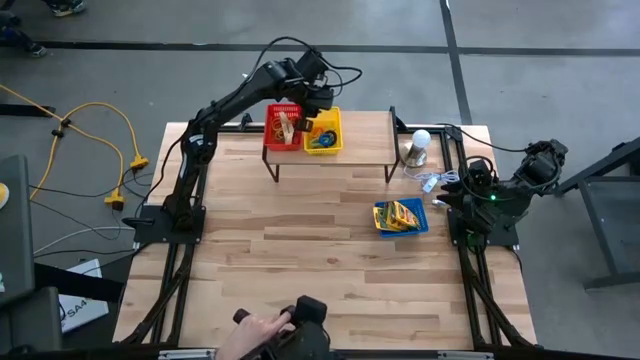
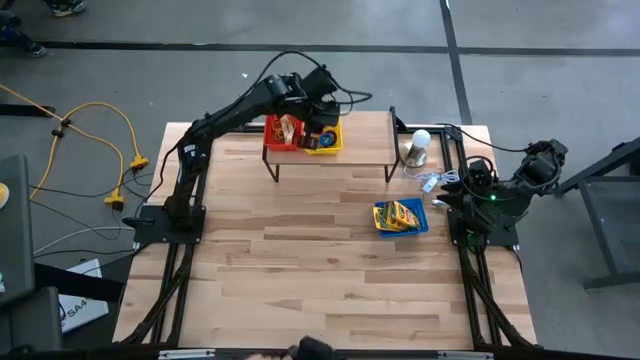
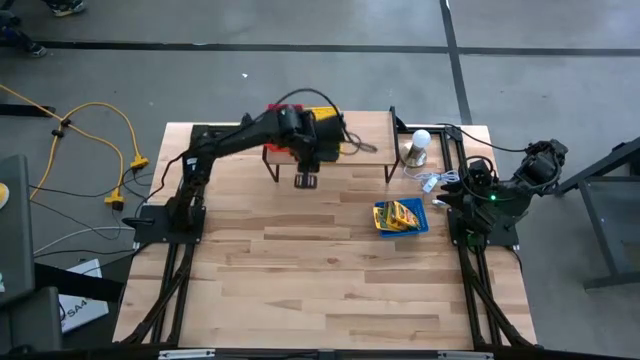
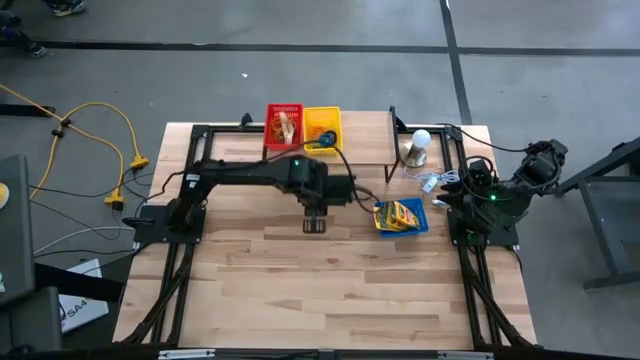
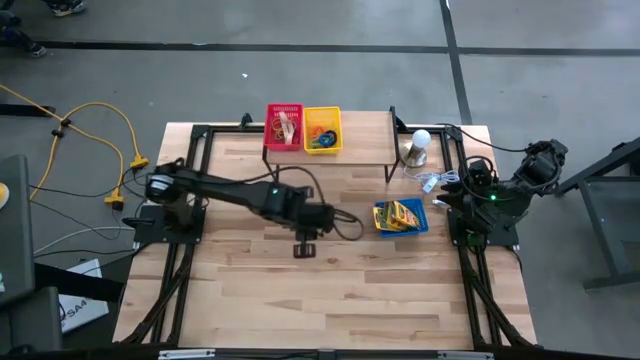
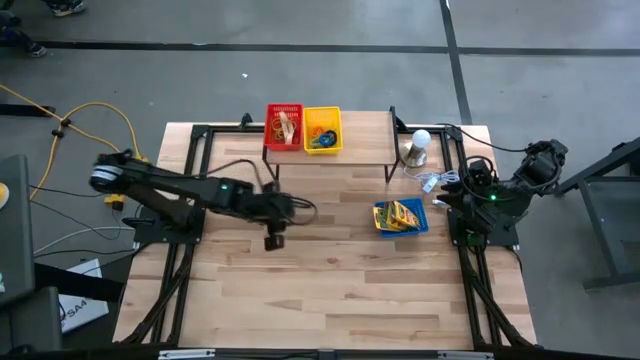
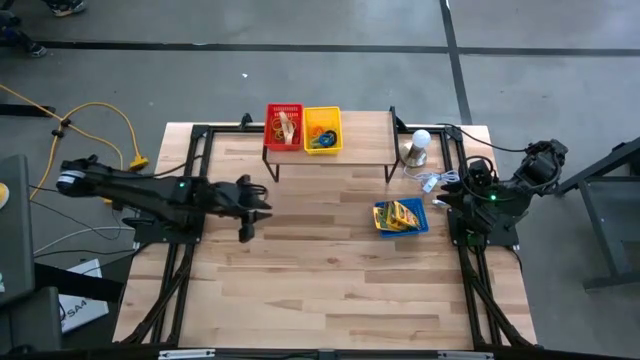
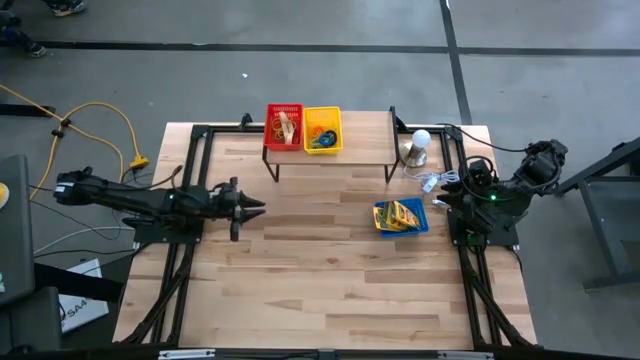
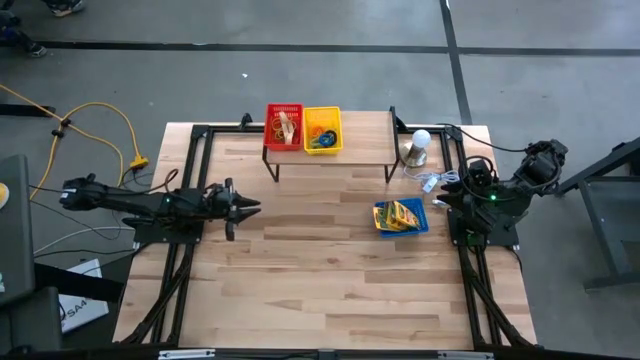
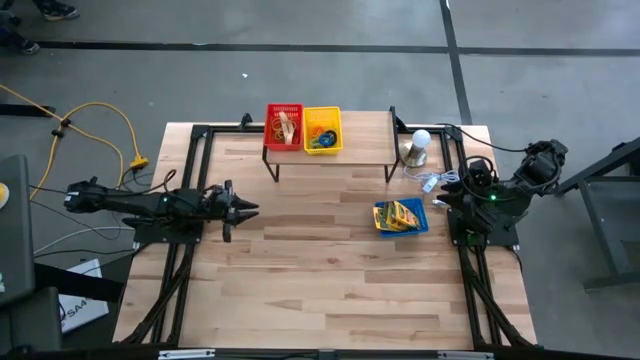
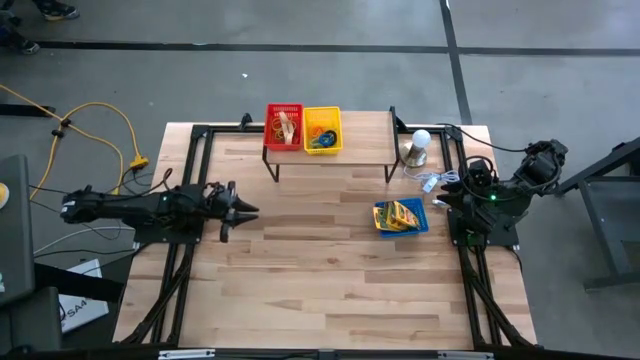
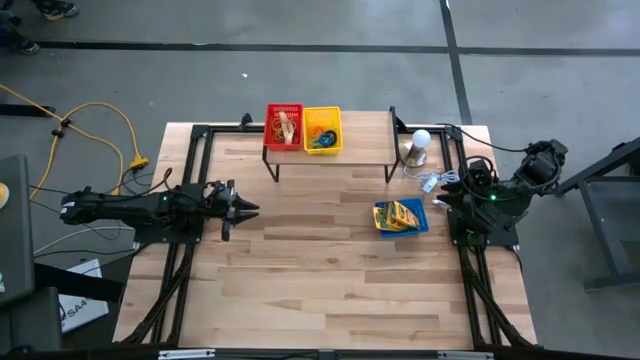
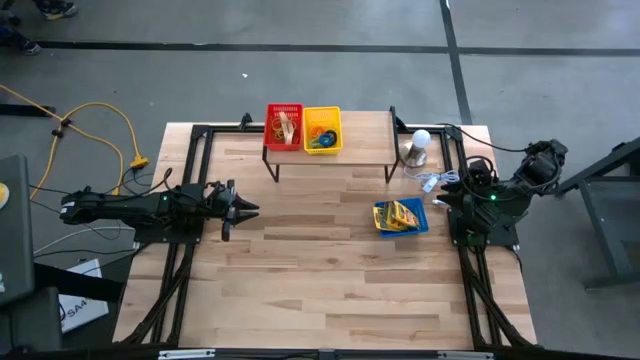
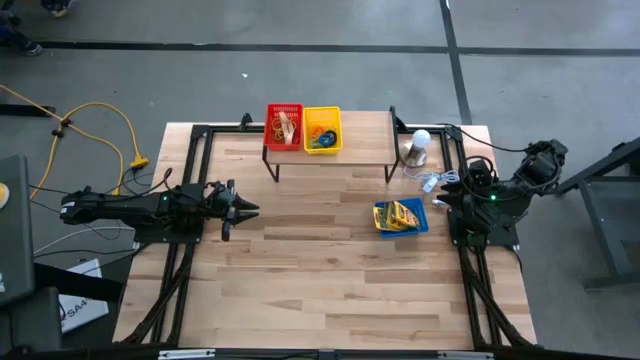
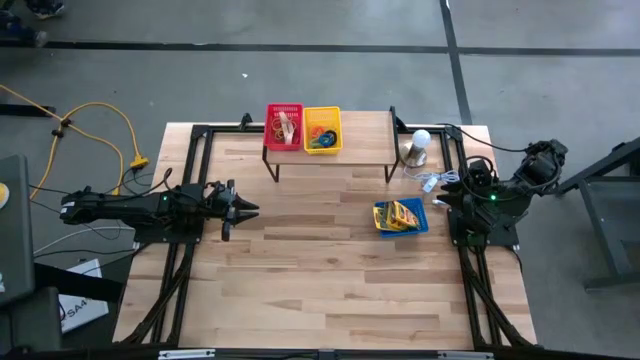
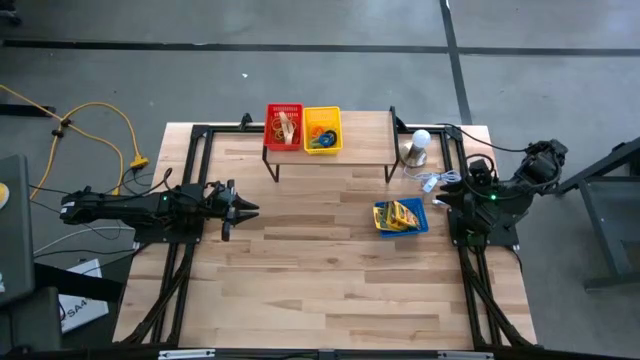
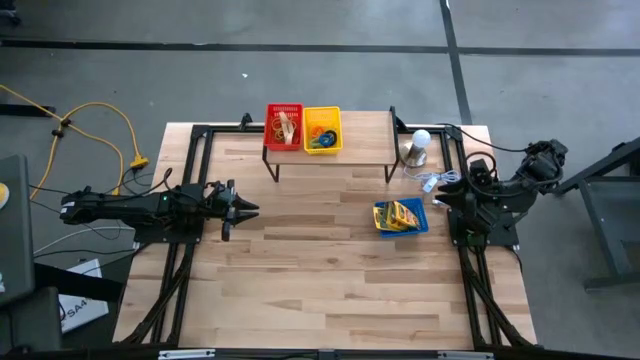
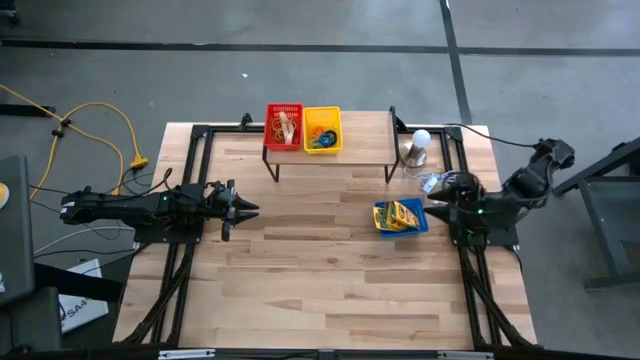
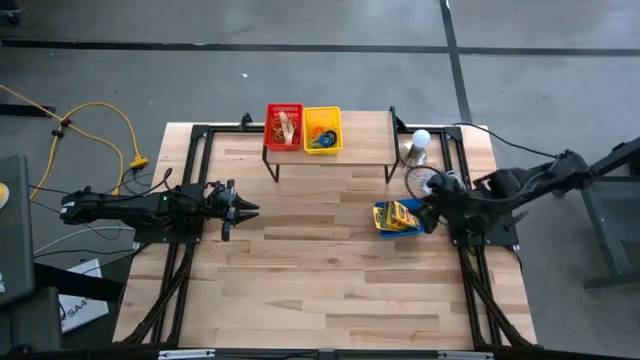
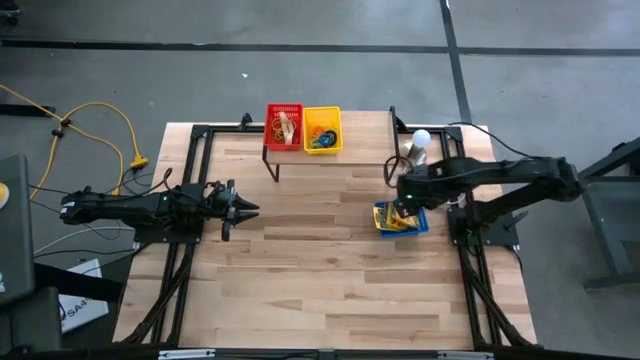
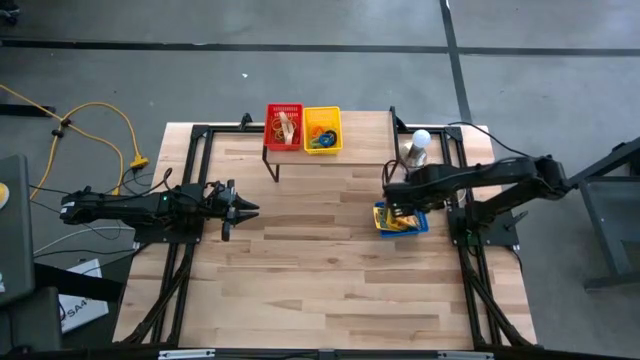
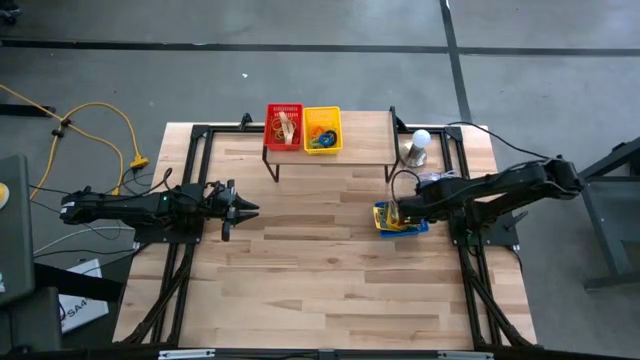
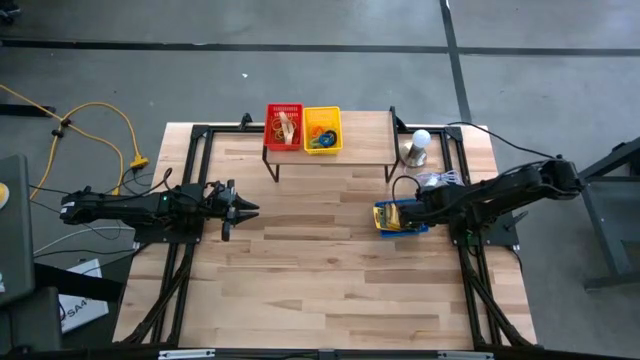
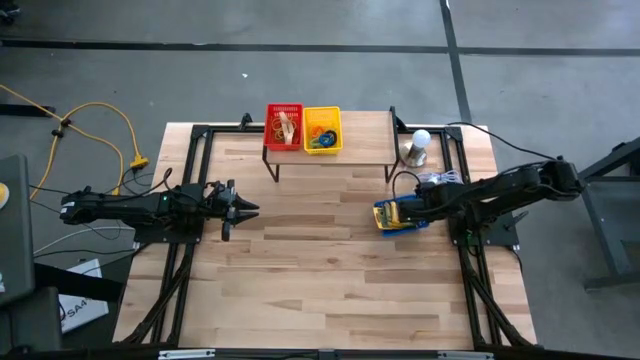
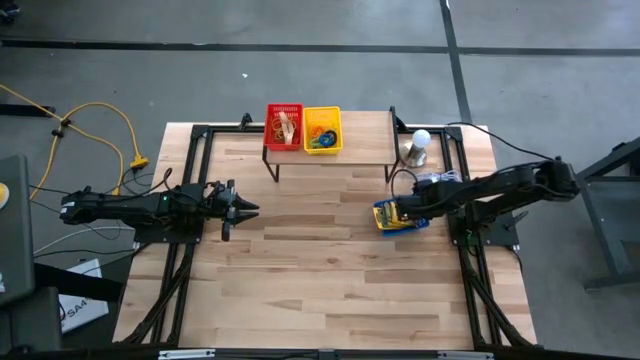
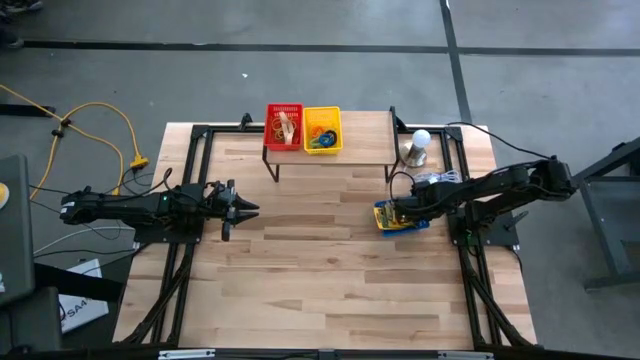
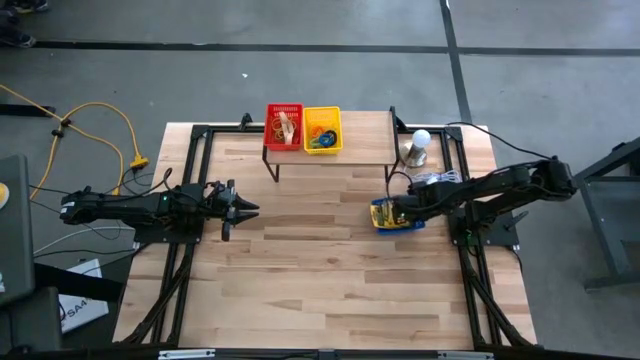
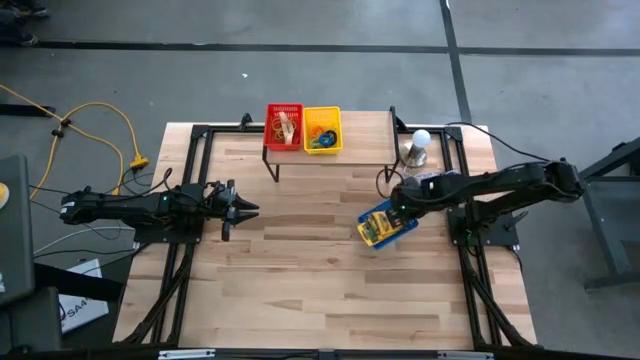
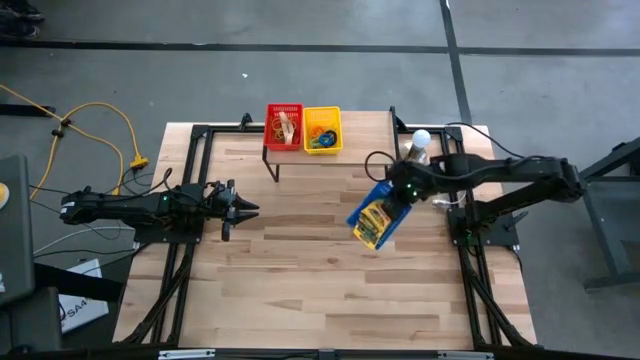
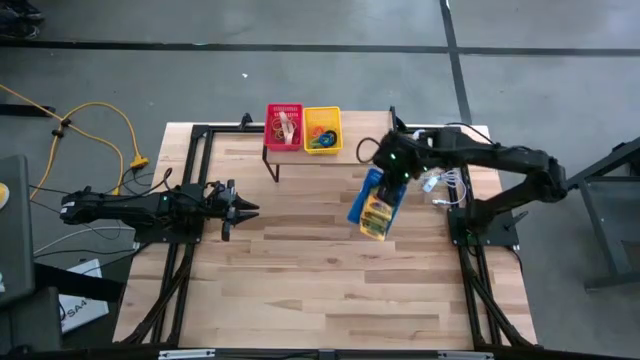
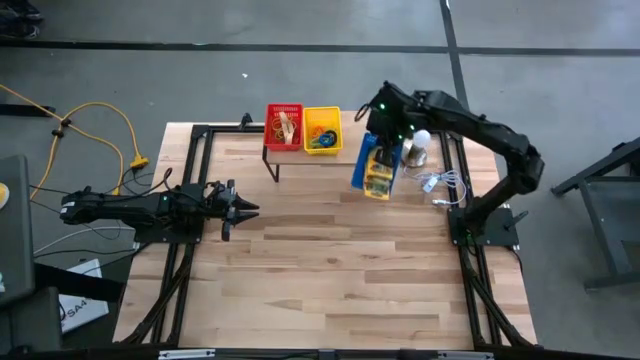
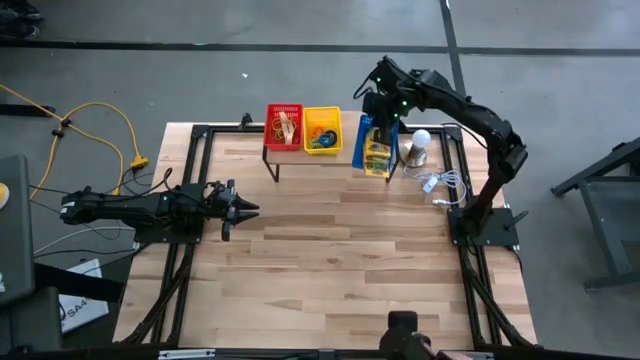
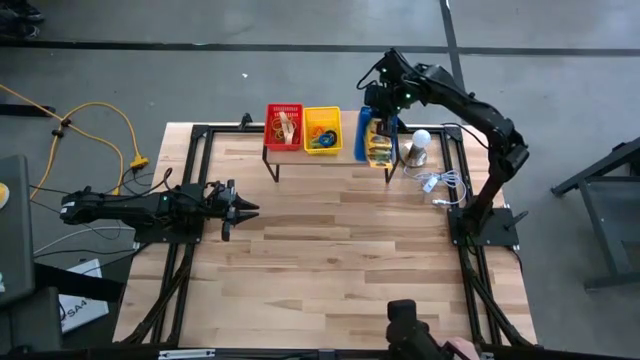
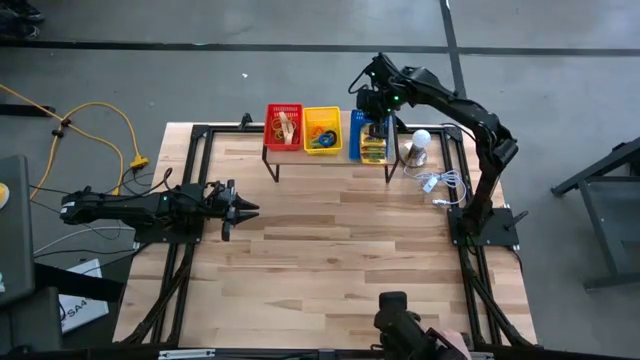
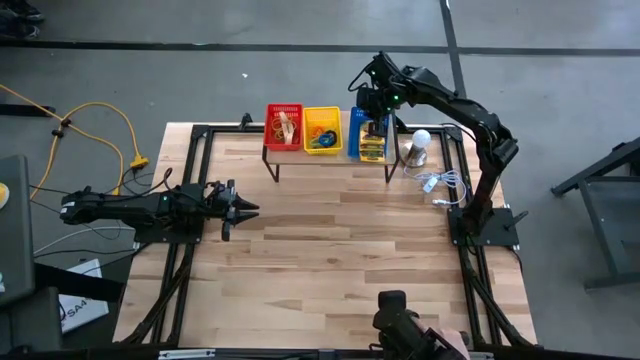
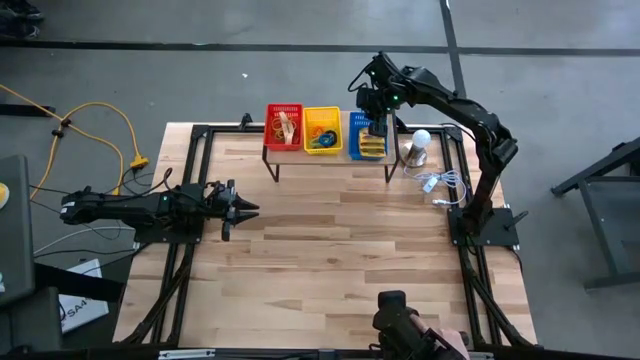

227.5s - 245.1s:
Task: Pick & Place Office Desk Supplies
Put the blue bin on the shelf

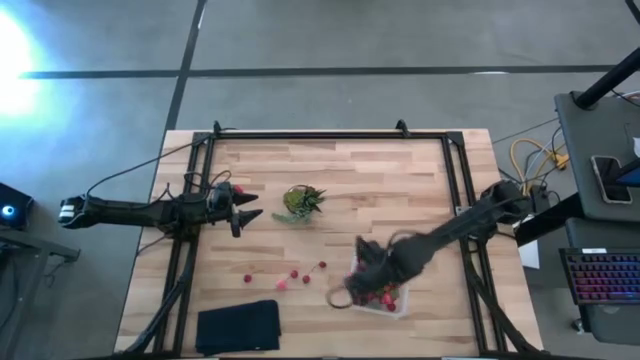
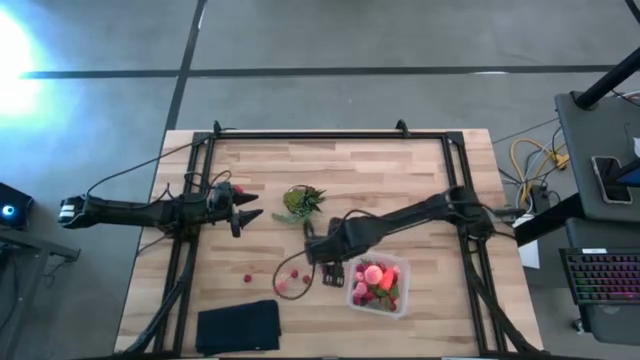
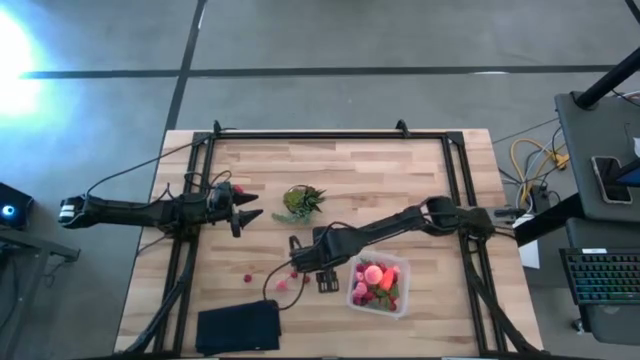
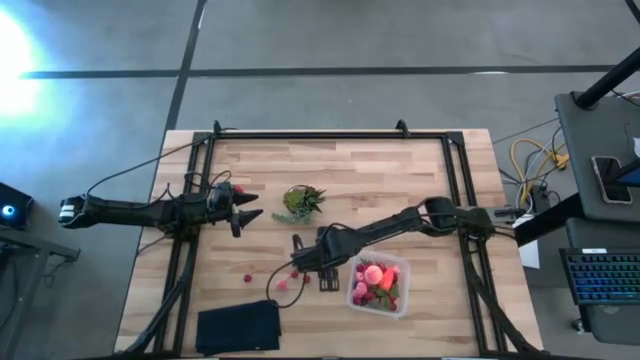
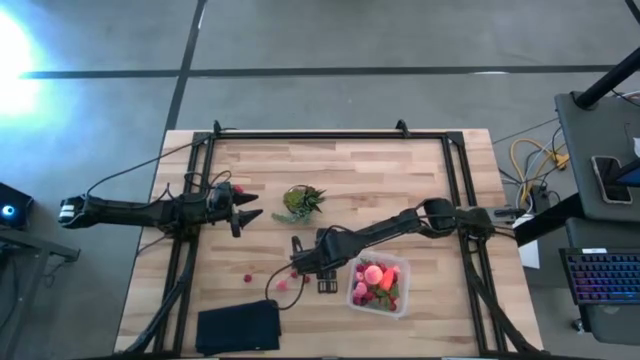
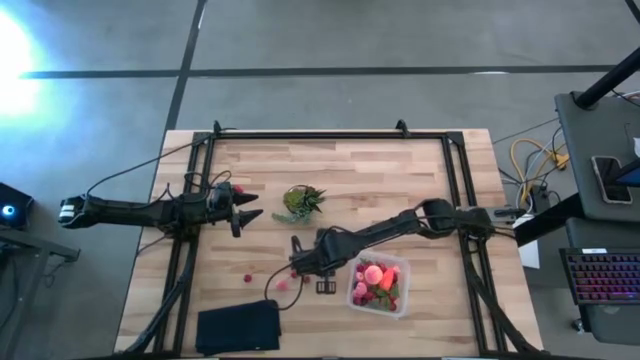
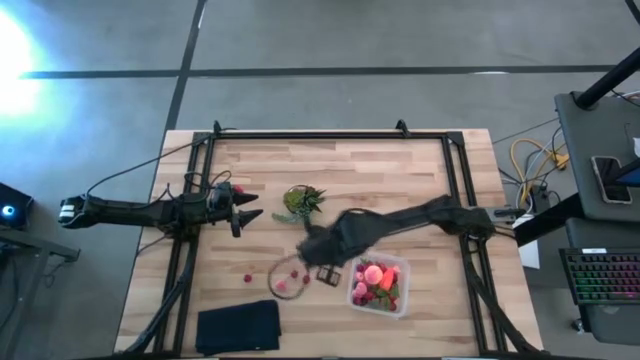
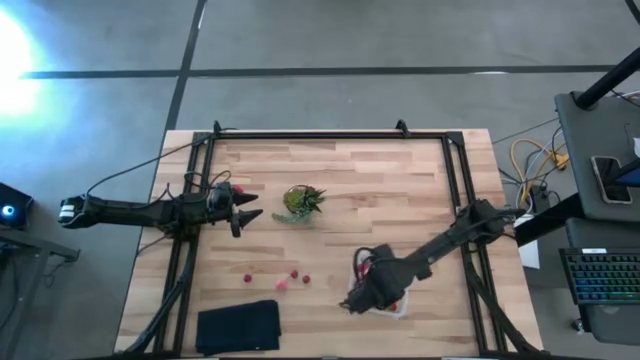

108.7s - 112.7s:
Task: Pick and placing Produce into tupperware
Put the cherry into the bin
